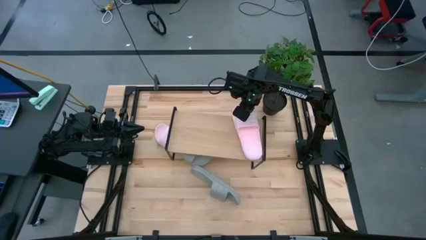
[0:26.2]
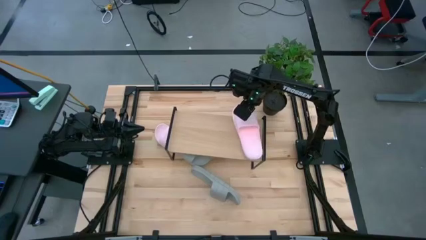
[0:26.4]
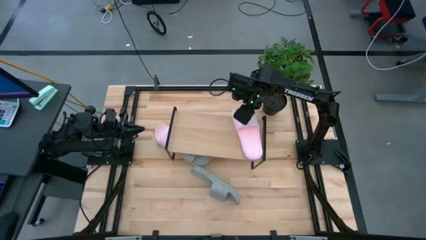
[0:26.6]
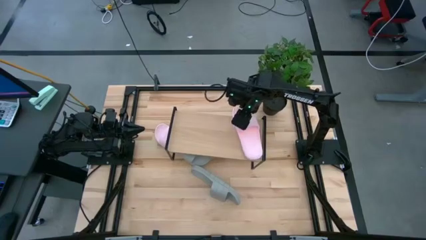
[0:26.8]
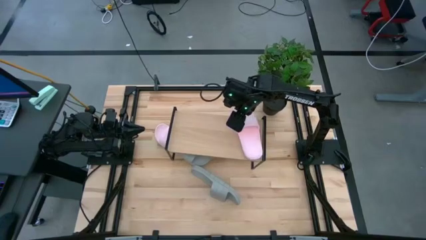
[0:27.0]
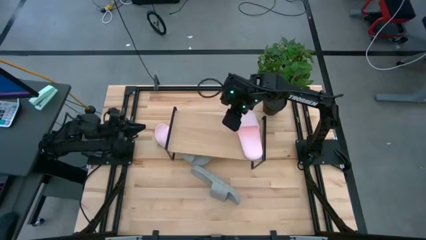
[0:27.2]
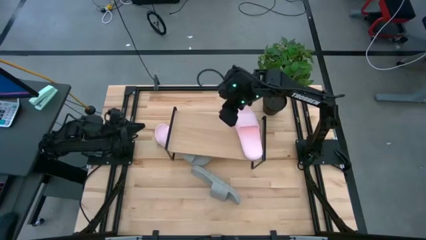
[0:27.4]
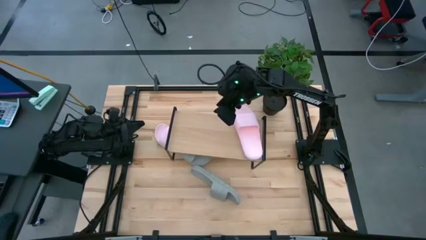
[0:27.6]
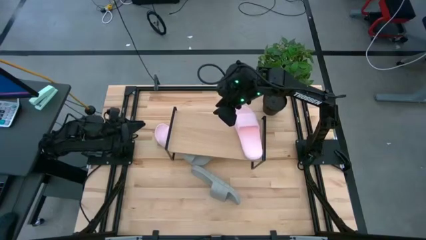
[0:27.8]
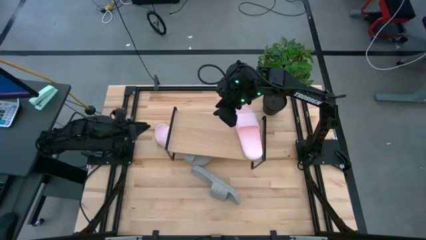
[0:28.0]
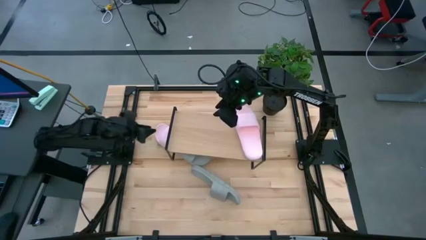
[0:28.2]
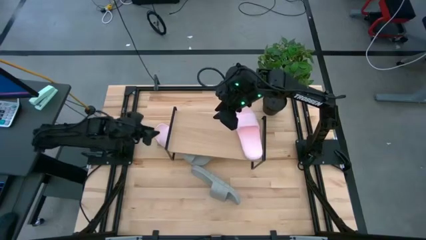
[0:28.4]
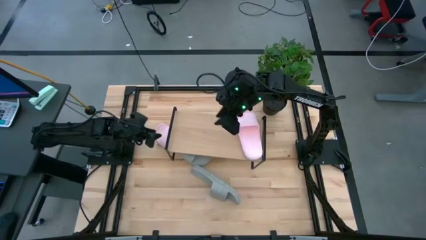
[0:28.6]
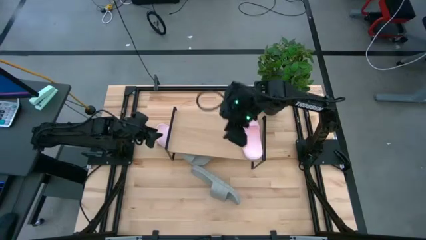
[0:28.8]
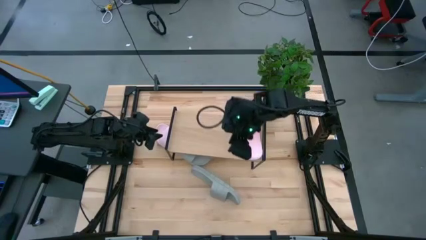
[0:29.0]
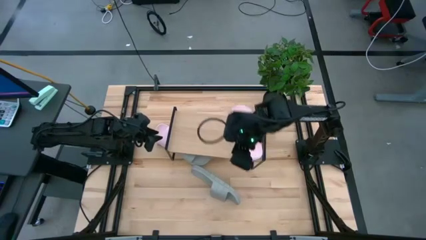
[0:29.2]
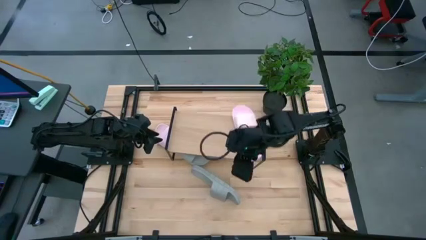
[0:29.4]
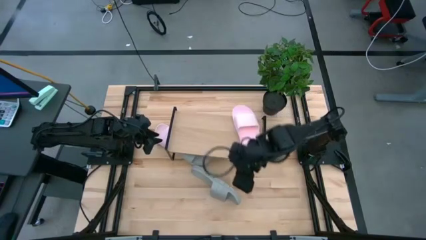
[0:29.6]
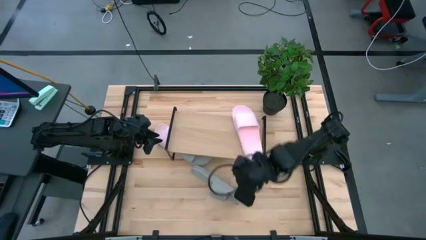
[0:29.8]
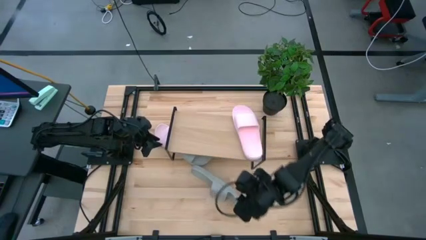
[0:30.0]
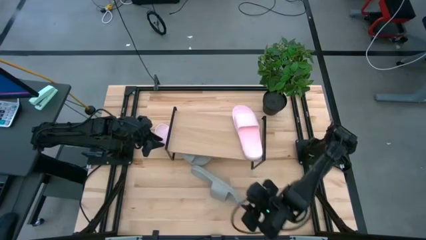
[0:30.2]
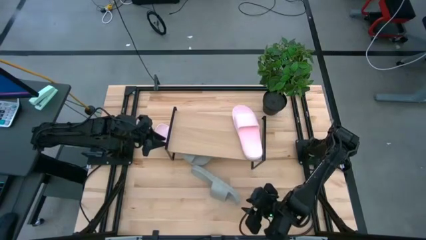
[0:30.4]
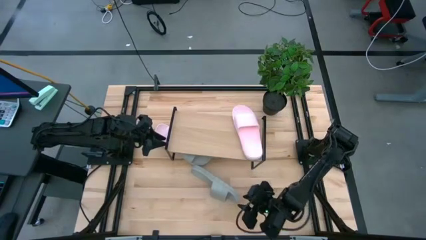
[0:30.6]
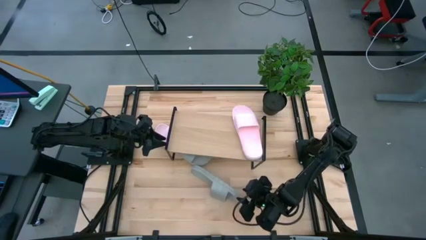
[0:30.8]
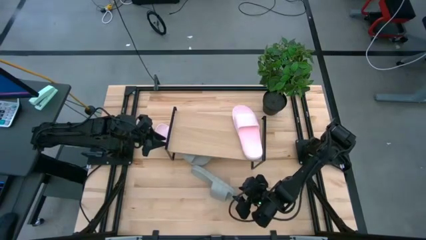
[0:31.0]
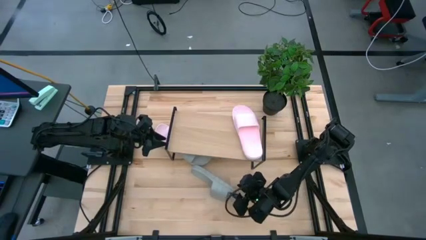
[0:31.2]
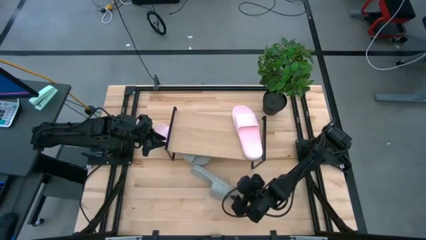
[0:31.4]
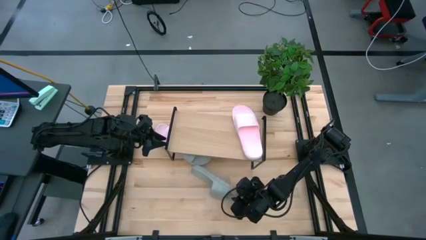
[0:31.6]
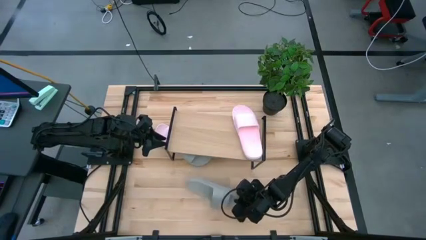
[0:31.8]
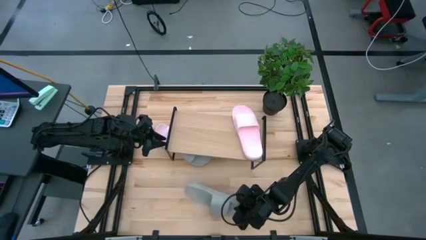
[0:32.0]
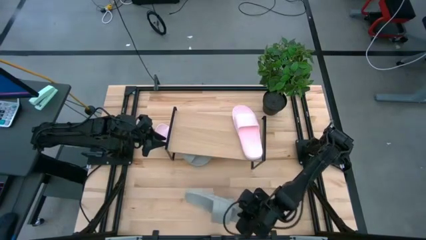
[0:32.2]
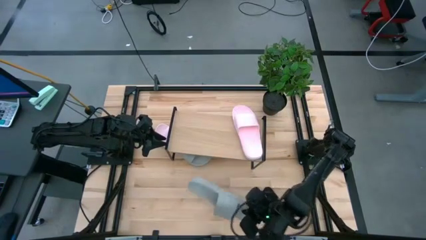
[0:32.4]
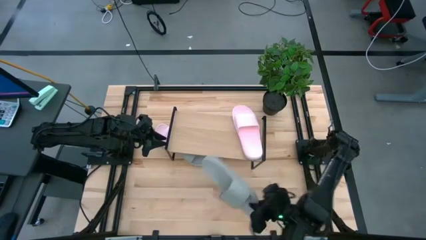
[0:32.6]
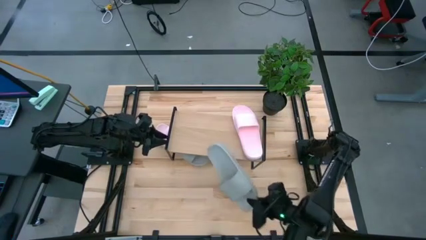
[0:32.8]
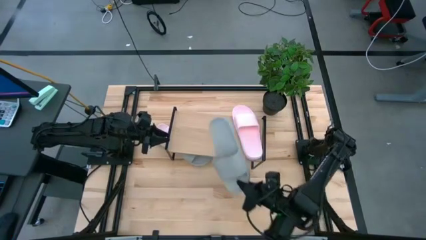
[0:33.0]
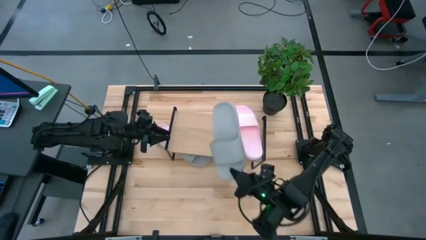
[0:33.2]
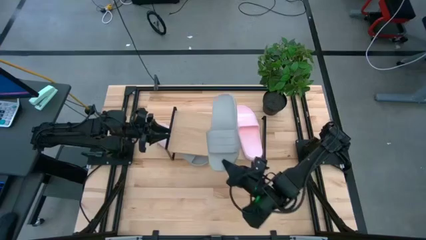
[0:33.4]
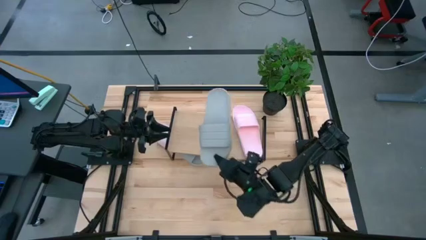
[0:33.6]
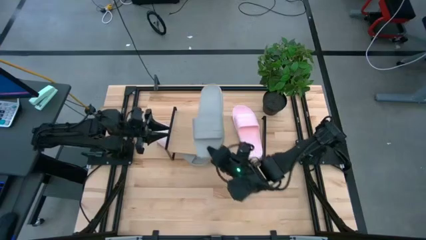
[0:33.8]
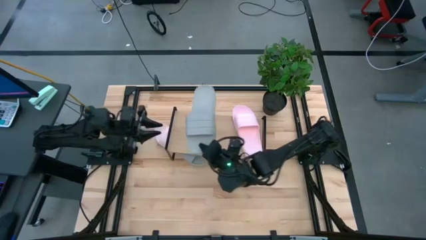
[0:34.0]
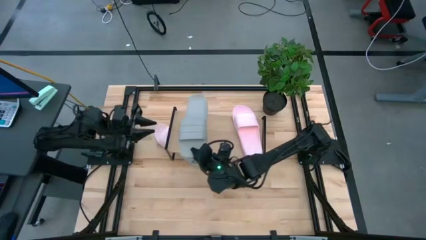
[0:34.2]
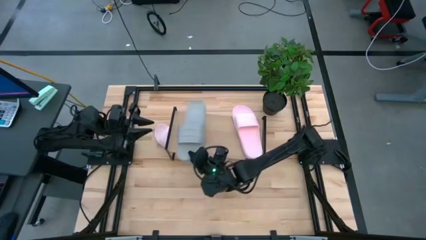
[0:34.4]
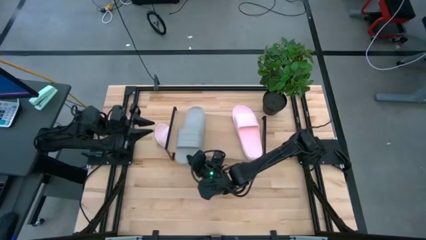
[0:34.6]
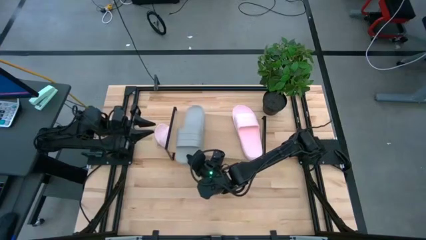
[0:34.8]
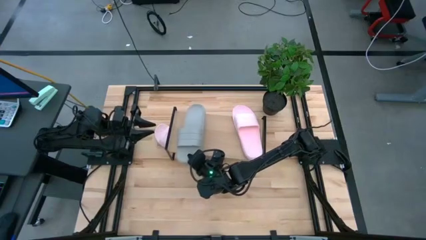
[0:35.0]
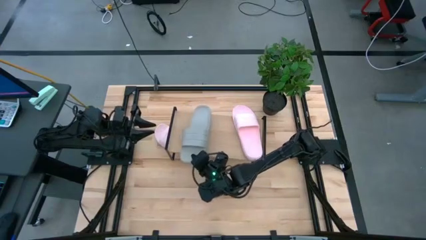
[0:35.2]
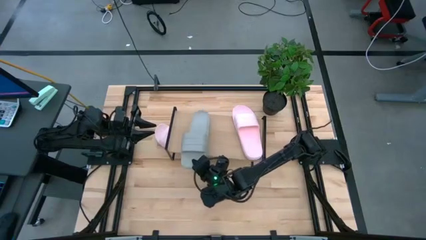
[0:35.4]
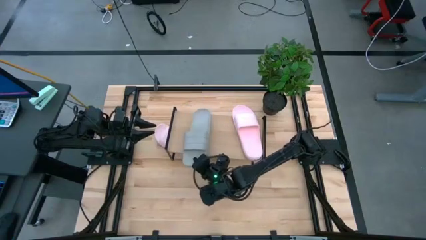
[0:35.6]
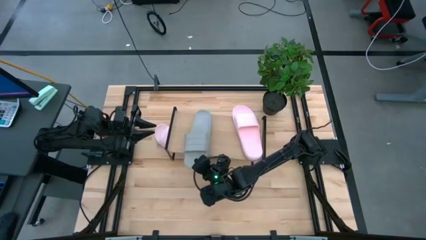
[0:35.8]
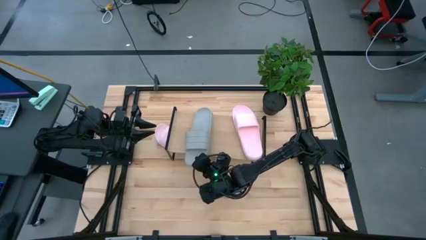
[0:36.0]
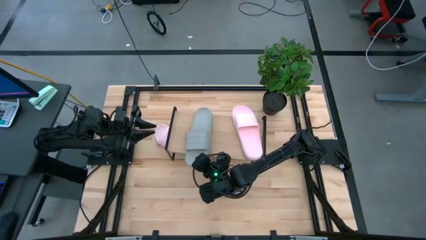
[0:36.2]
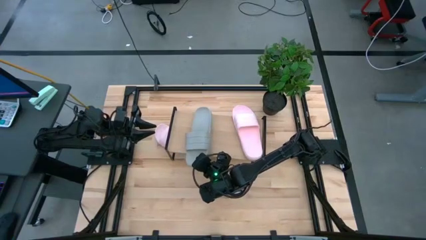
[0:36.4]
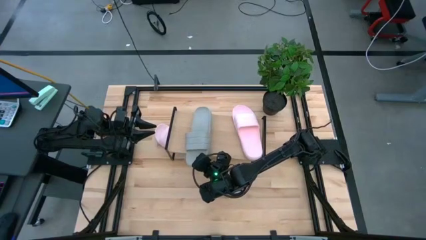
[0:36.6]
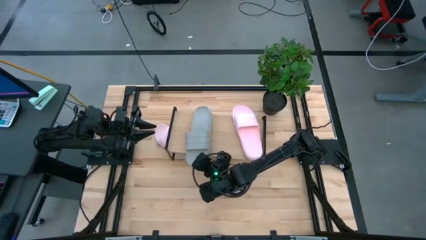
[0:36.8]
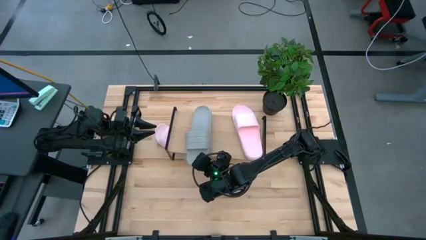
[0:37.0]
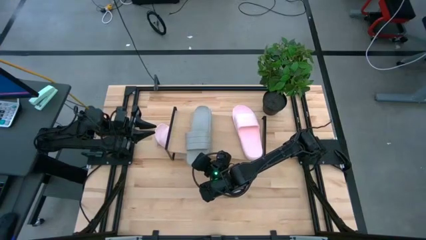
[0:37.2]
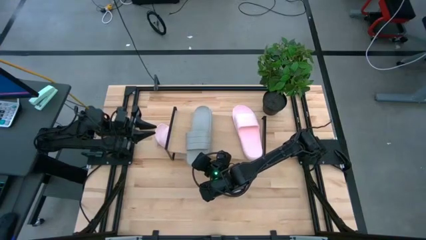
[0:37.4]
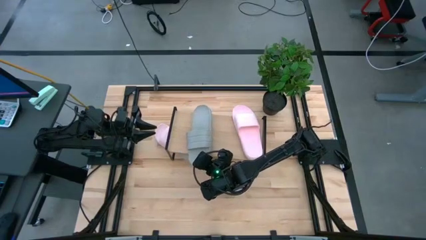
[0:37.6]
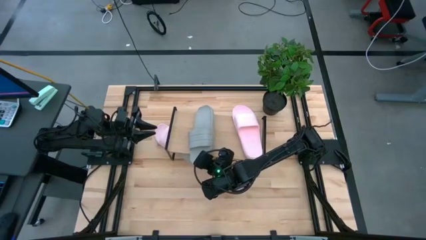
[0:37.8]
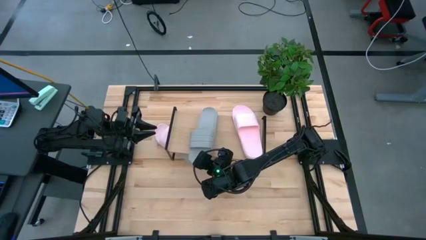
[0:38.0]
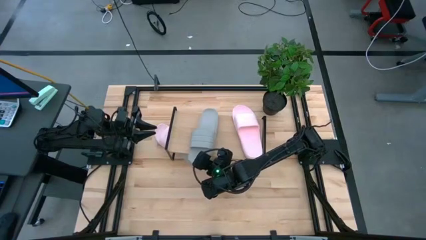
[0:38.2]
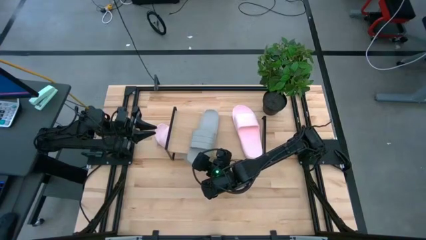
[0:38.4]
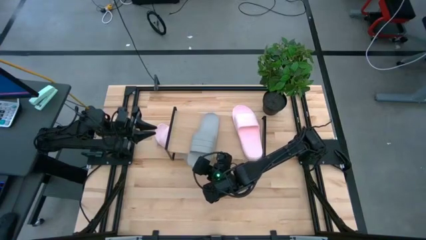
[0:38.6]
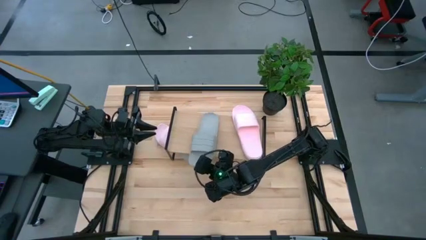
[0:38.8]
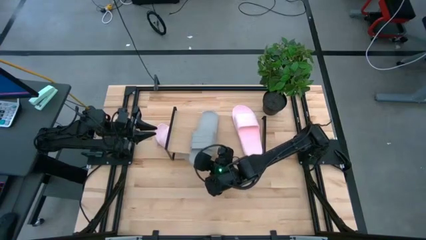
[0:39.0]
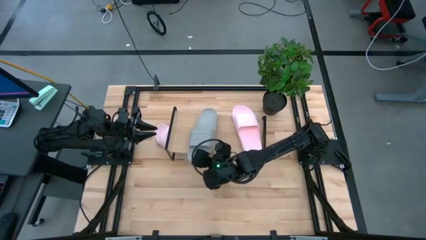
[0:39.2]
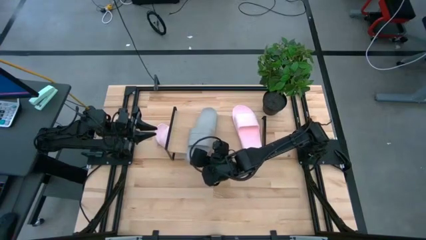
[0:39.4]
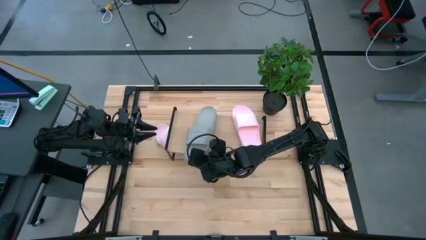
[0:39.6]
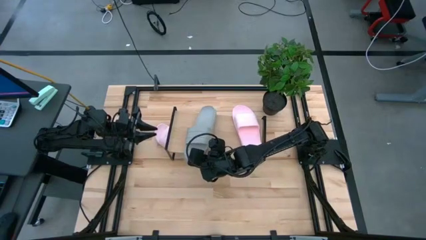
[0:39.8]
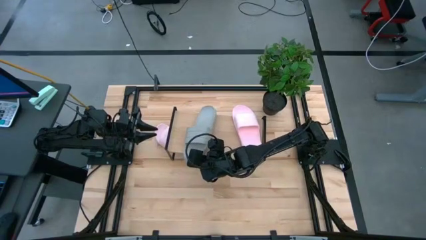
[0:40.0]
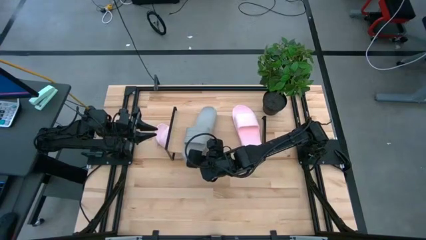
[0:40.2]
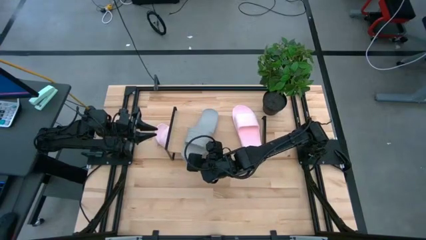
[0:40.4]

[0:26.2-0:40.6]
Task: Pick and place slides into the shelf
Put the bottom gray slide on the shelf

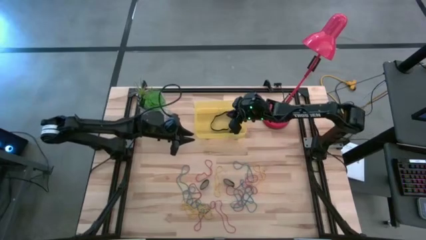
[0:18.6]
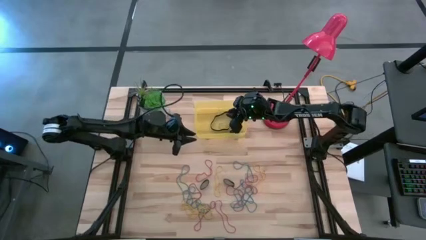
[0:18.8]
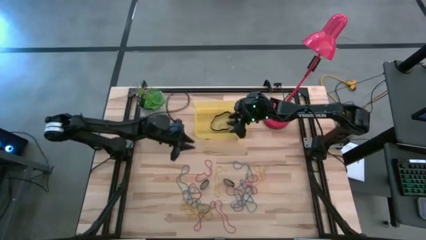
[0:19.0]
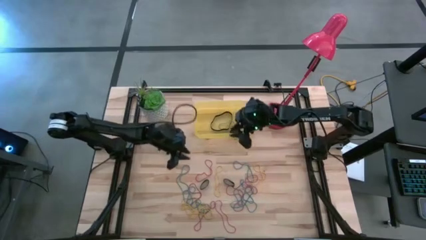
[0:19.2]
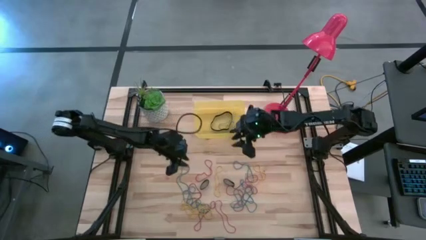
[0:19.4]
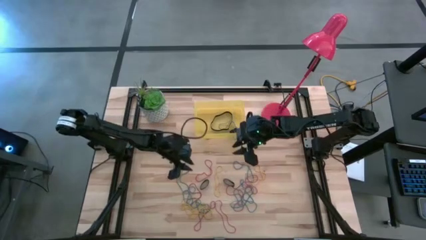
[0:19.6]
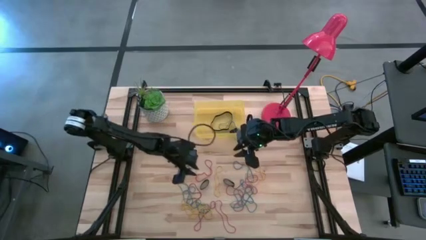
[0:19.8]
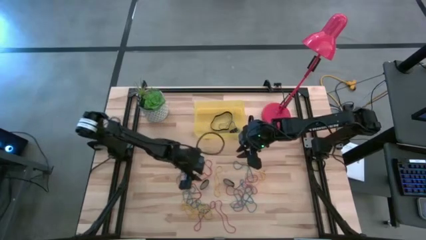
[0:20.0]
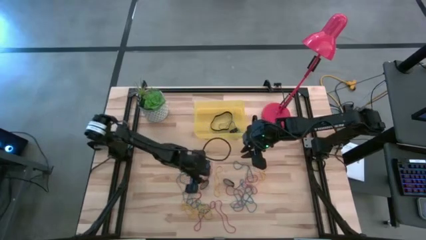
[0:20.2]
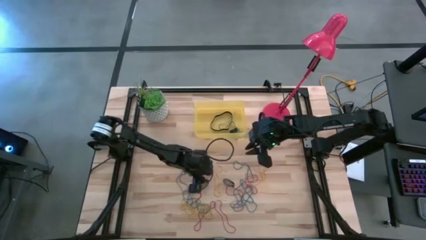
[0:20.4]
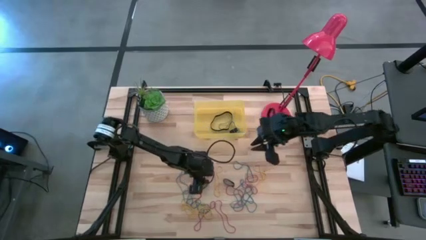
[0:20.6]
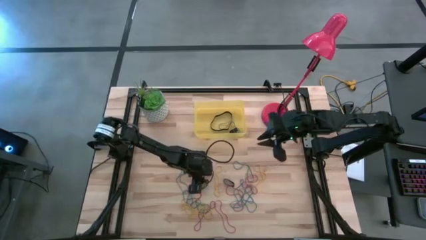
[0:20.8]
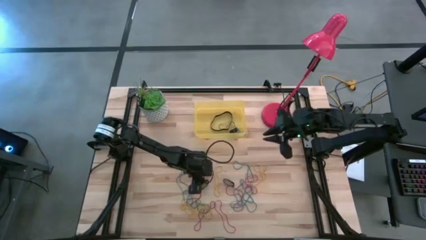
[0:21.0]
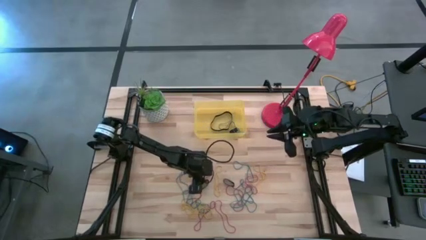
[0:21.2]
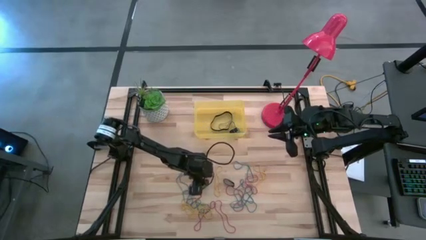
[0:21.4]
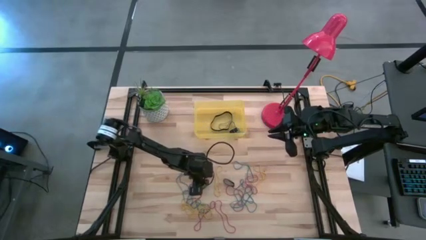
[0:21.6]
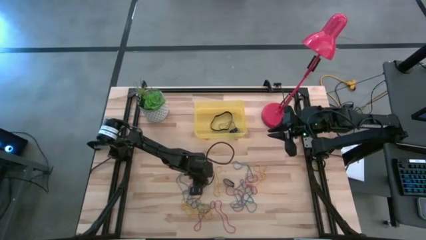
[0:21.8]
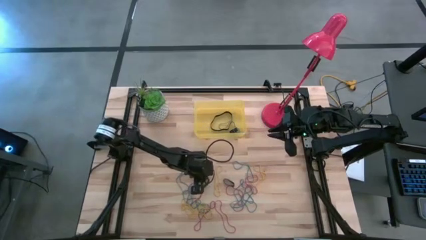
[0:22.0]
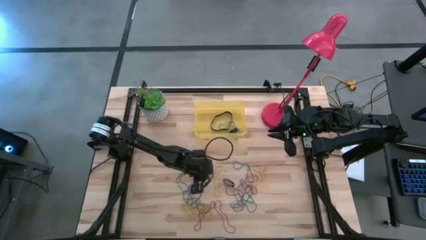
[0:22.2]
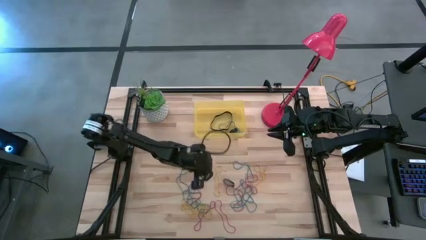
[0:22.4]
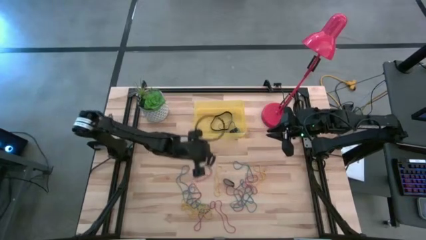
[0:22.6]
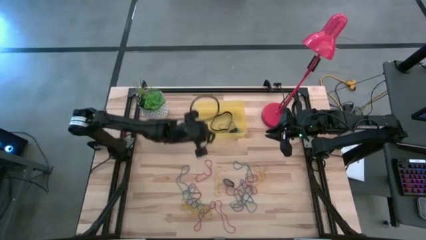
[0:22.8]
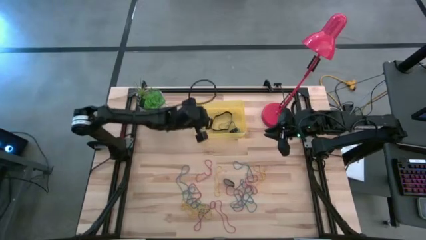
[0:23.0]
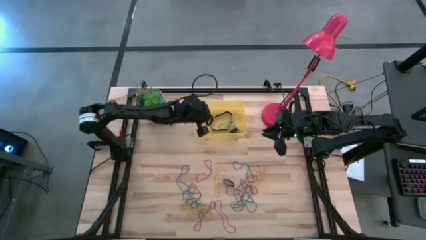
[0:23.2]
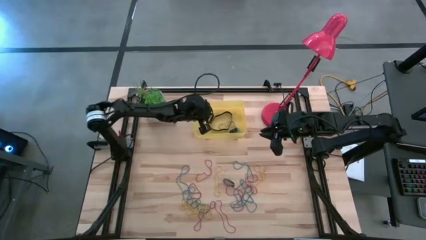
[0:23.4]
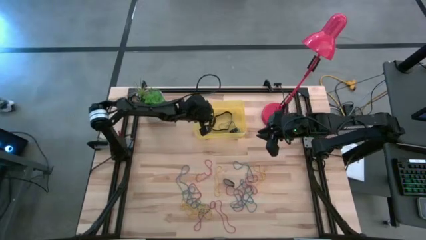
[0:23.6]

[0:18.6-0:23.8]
Task: Pick and place rubber bands into bin
Put the black rubber band into the yellow bin
